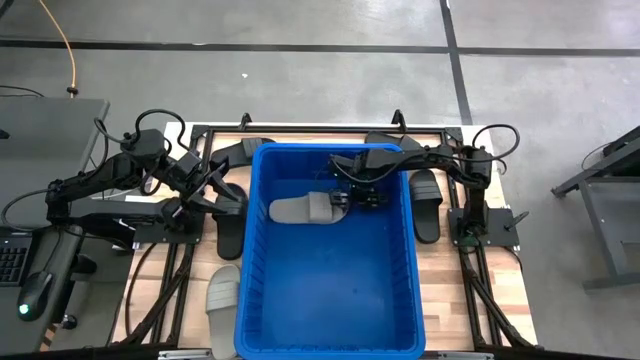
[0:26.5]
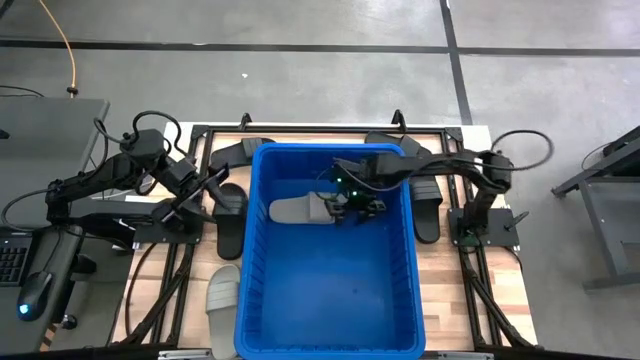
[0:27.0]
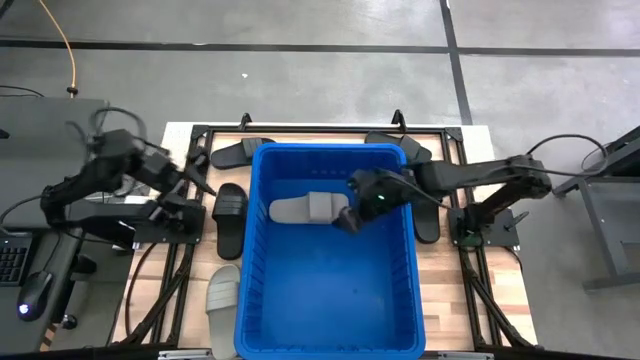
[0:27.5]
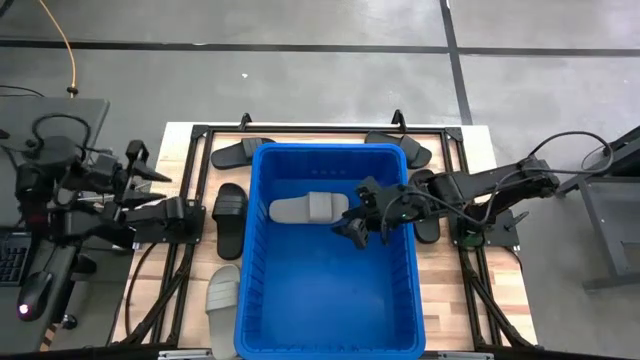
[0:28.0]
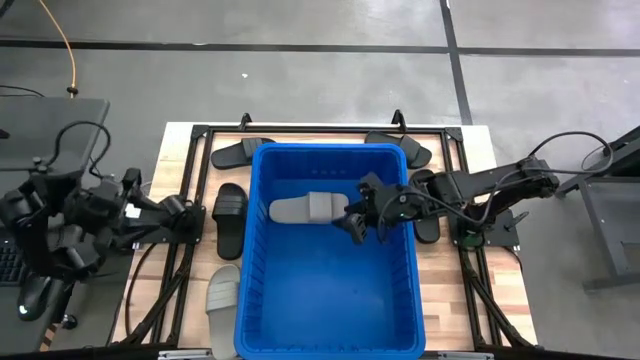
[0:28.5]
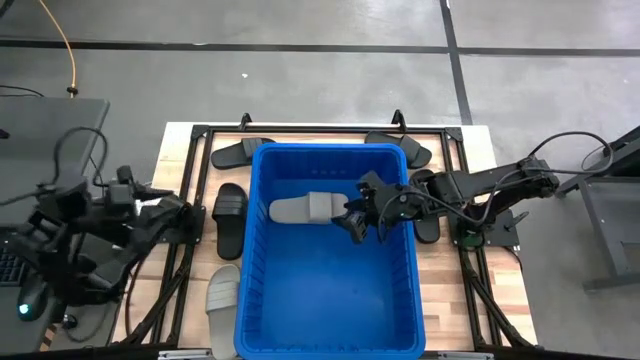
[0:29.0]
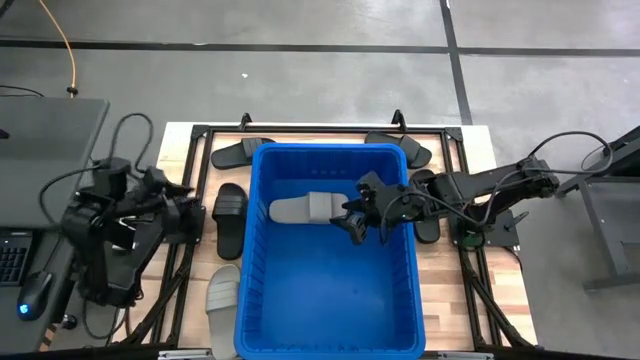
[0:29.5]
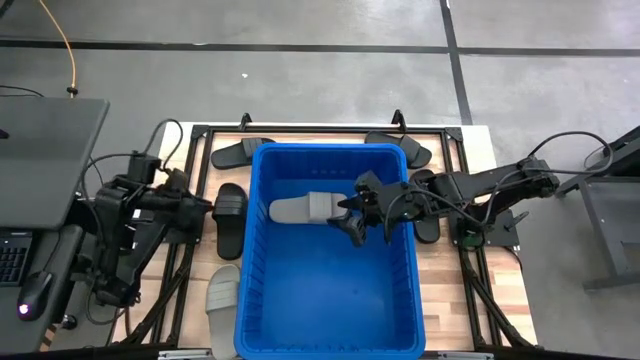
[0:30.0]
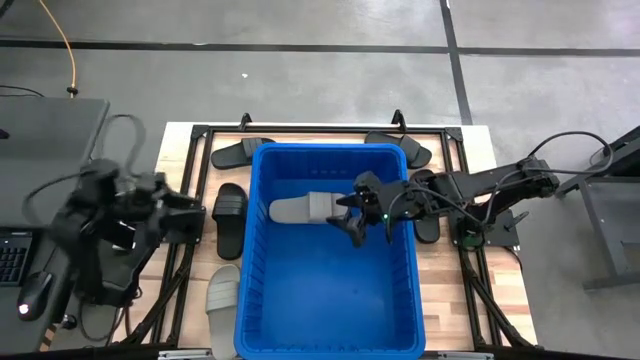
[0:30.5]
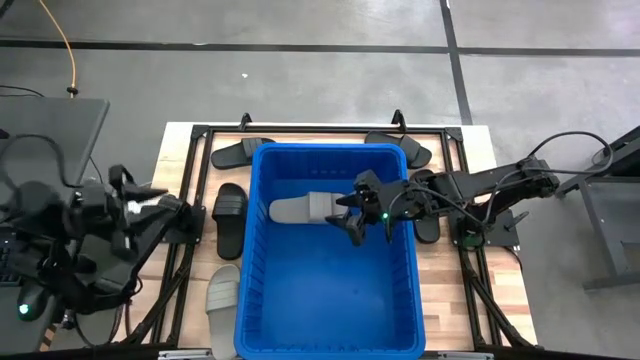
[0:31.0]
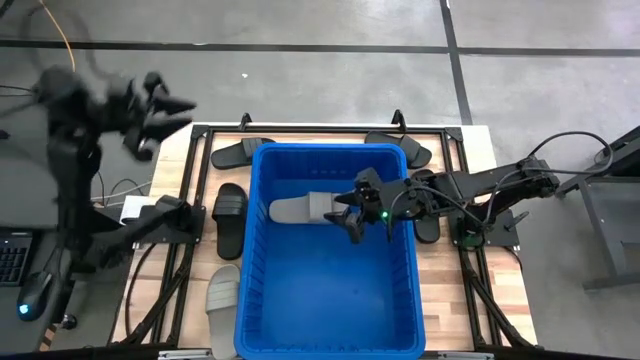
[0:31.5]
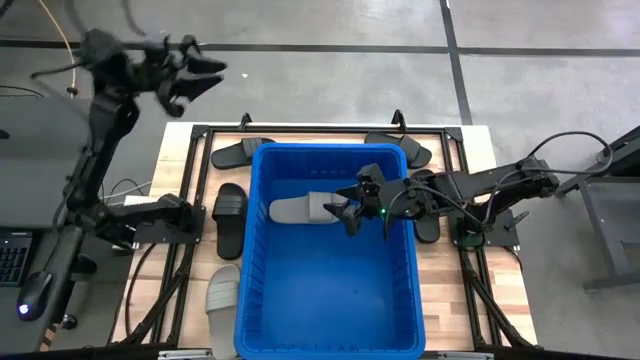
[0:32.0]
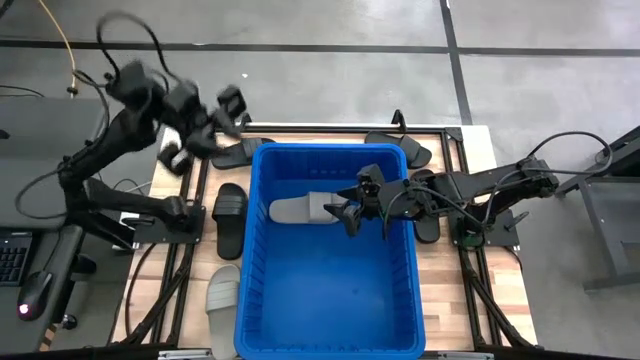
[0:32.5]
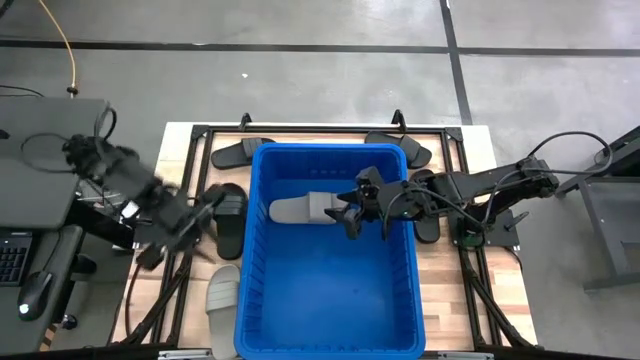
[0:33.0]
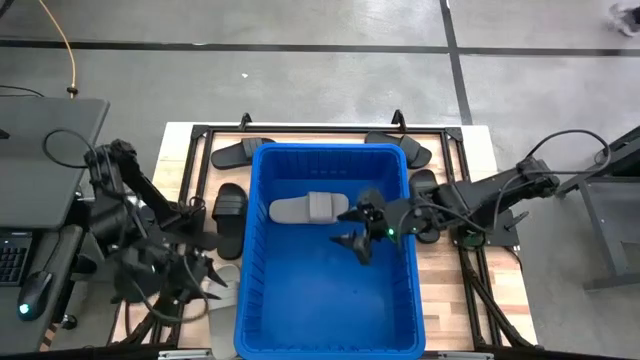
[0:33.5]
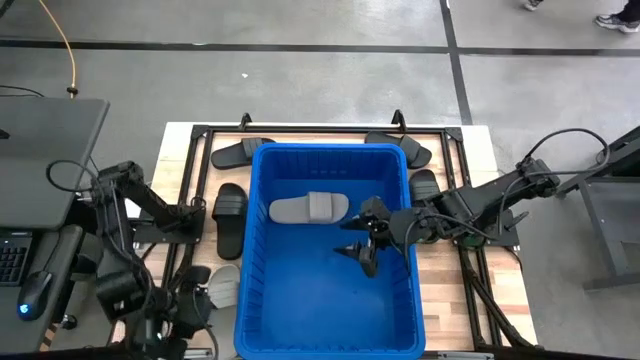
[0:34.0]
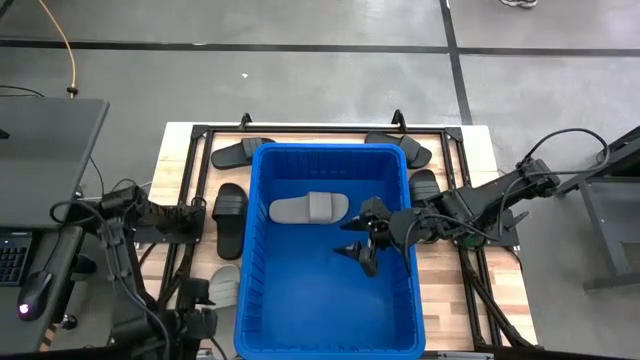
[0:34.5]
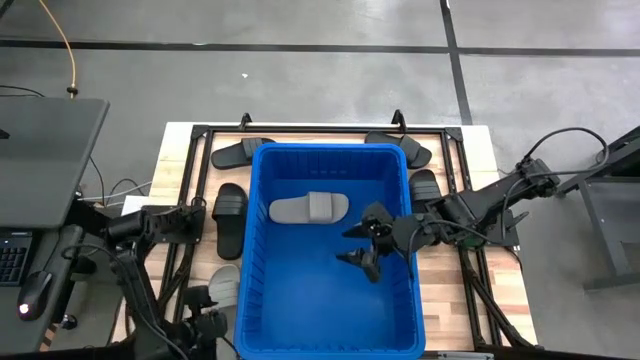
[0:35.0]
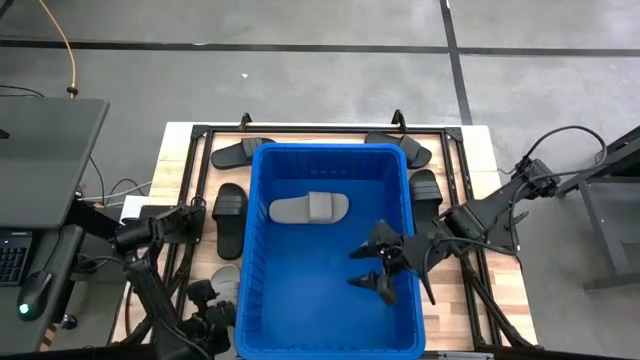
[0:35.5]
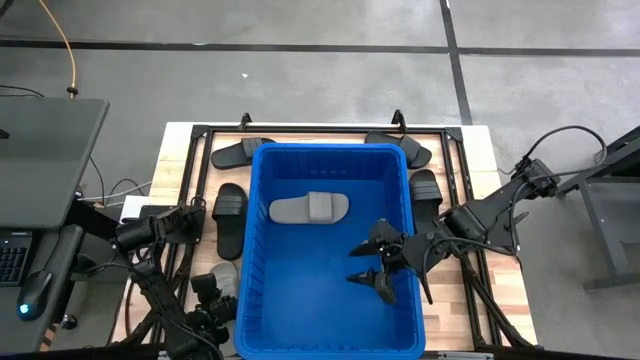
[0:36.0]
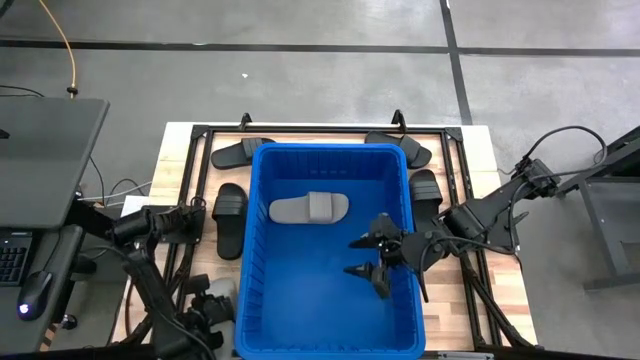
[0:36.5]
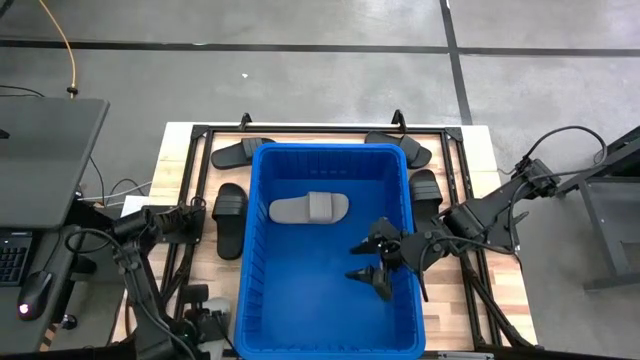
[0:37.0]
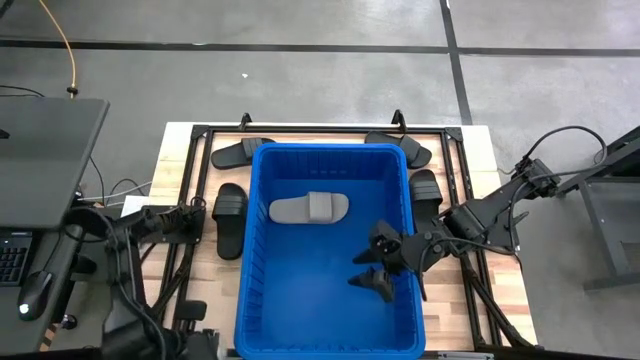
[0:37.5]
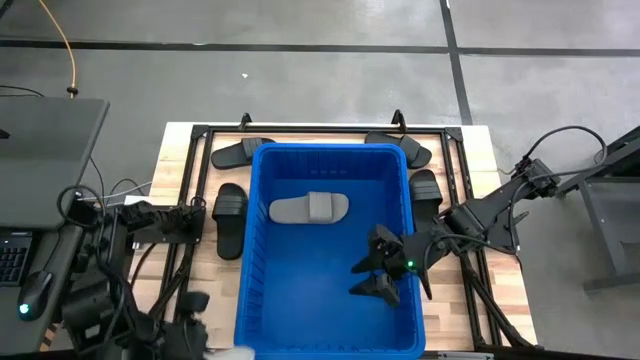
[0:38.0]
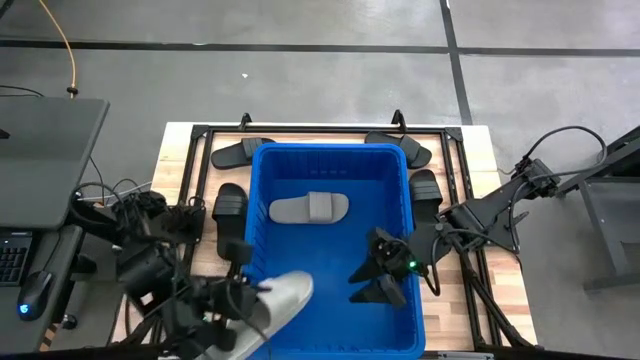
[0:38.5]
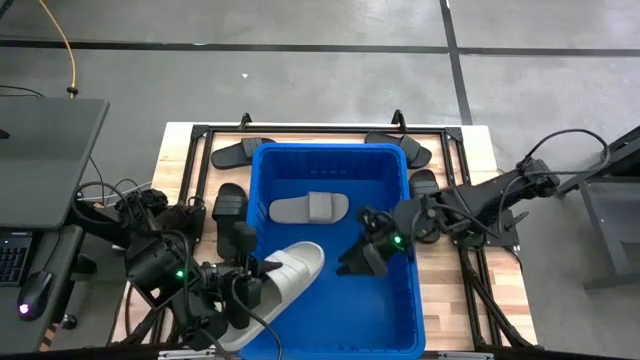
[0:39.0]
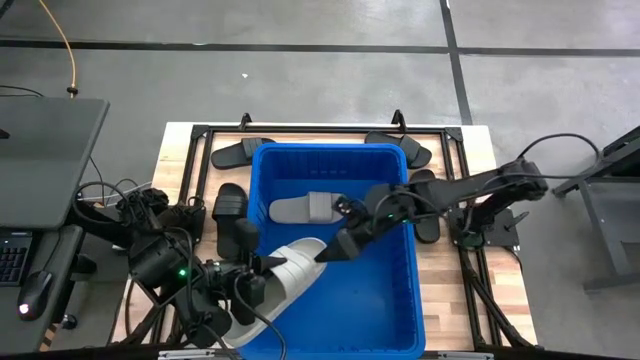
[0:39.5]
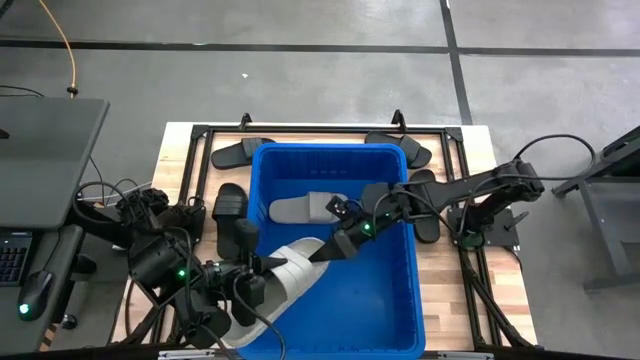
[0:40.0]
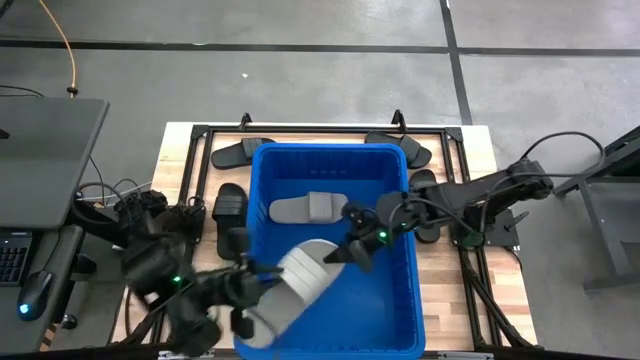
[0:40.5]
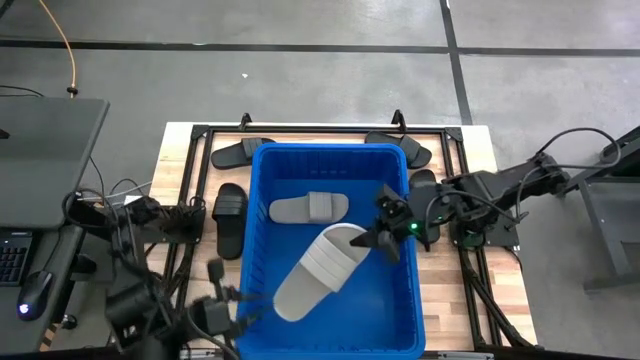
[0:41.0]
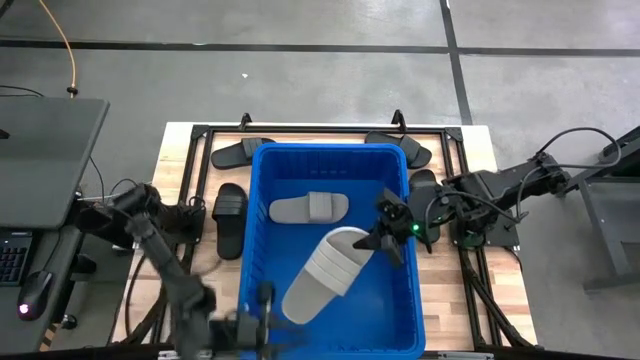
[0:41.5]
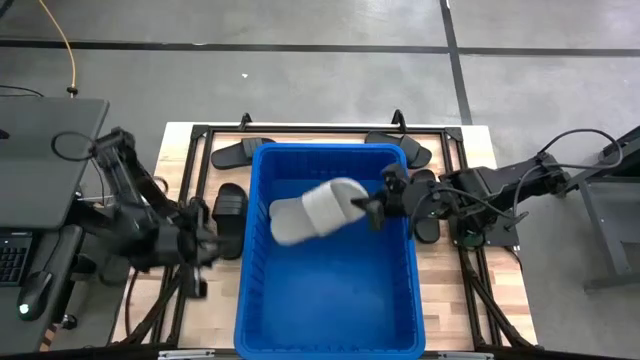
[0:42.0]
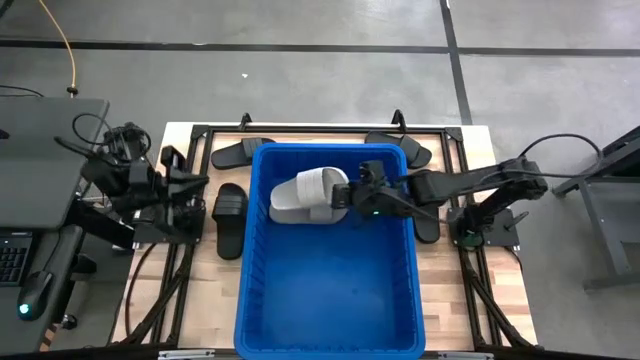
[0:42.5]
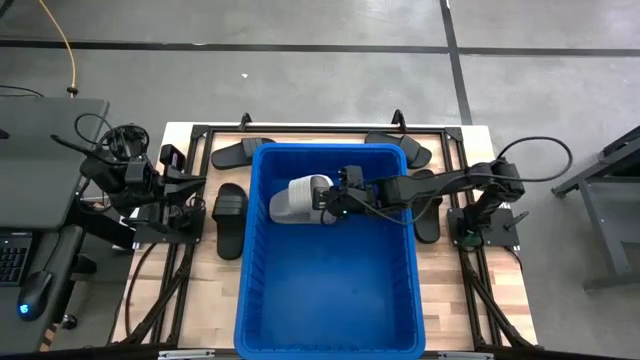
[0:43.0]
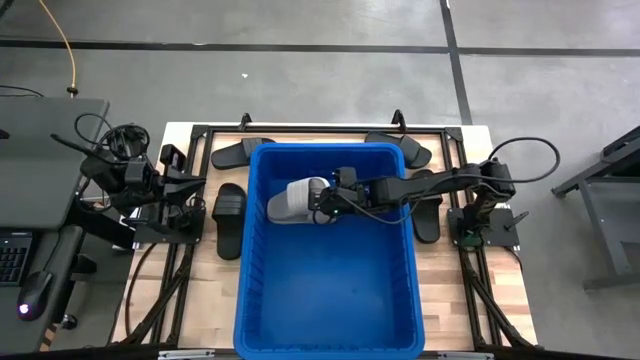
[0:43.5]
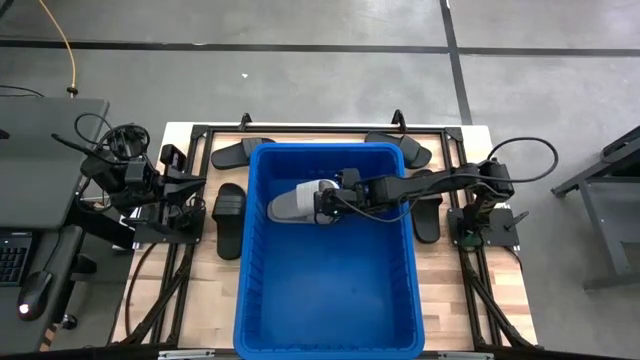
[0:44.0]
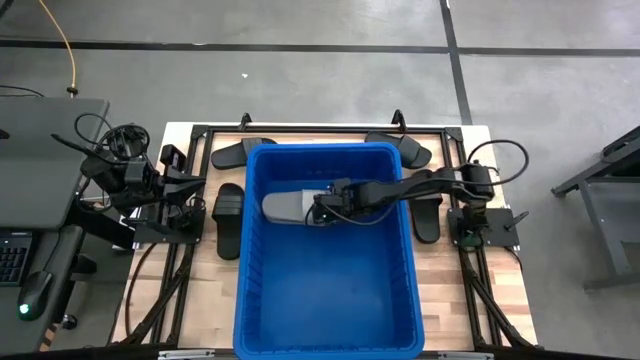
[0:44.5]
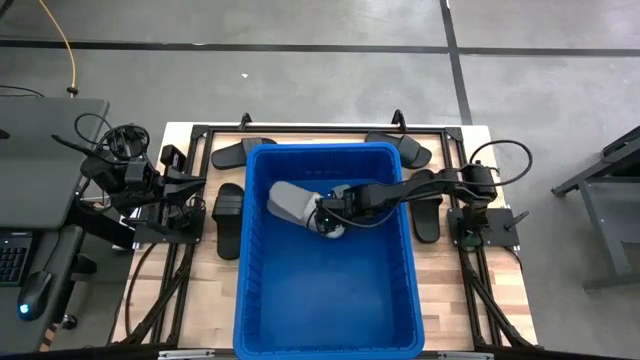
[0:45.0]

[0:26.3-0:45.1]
Task: Pick and place slides into bin
Put the gray slipper into the blue bin

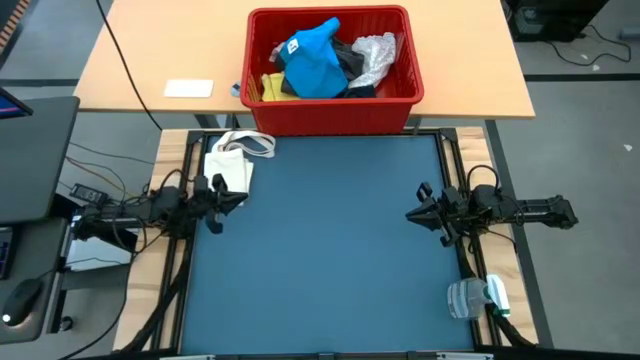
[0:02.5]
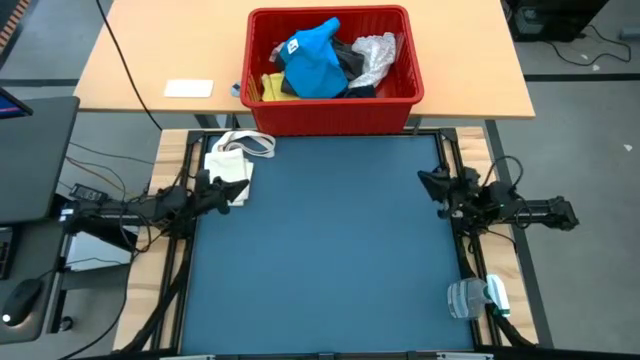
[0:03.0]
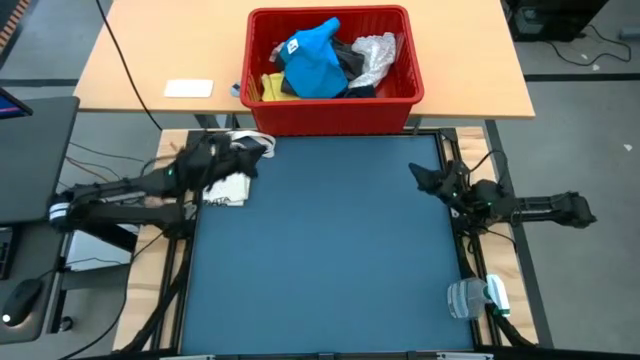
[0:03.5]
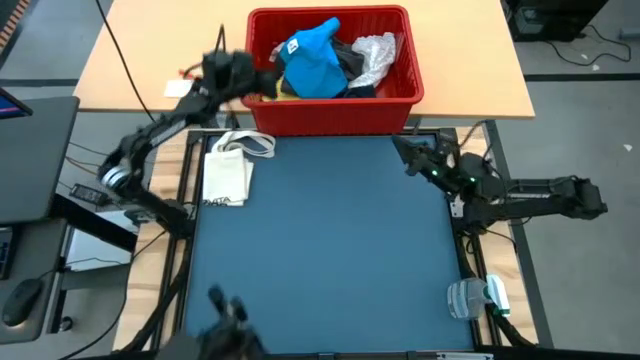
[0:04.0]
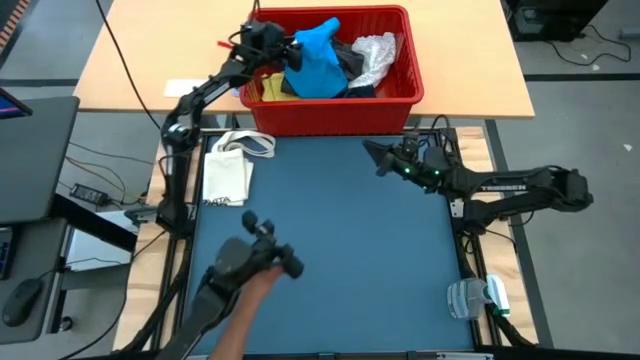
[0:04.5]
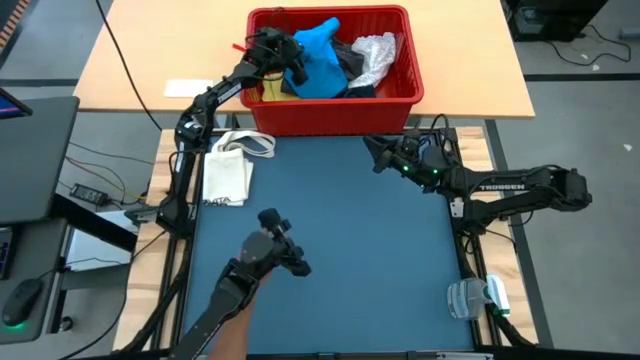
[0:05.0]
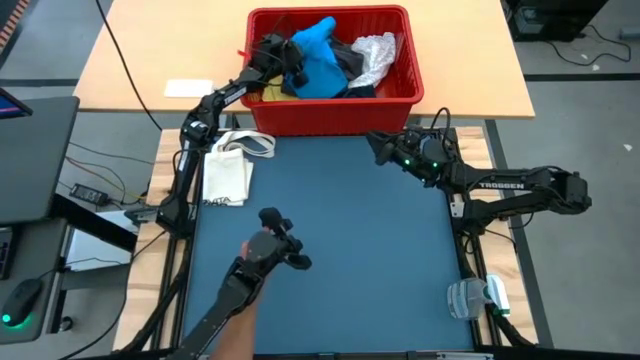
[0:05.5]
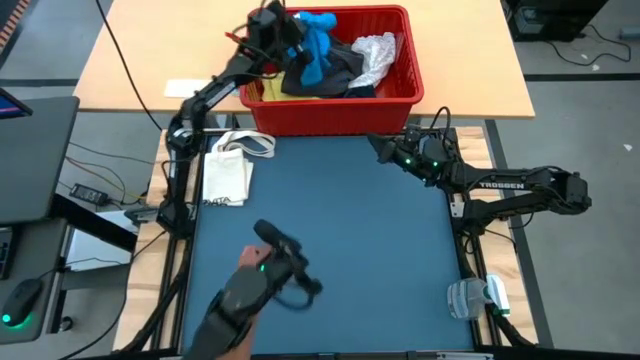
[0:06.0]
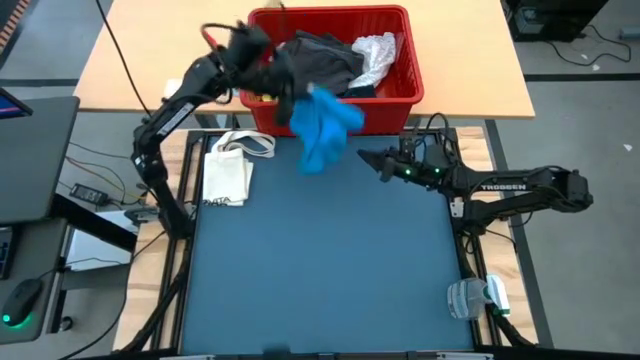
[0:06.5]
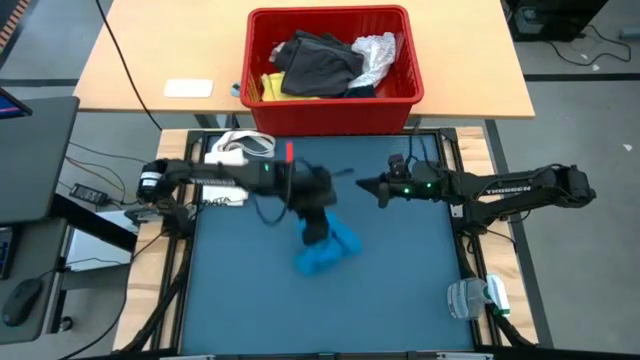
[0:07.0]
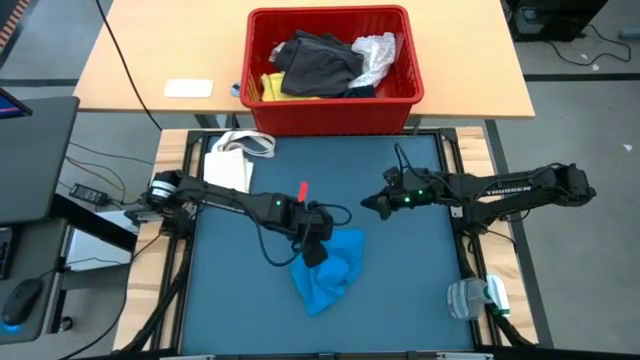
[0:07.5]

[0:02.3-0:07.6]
Task: Fold laundry
Remove the blue shorts from the red bin
